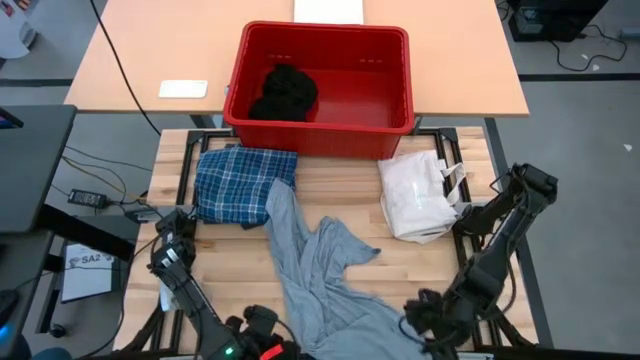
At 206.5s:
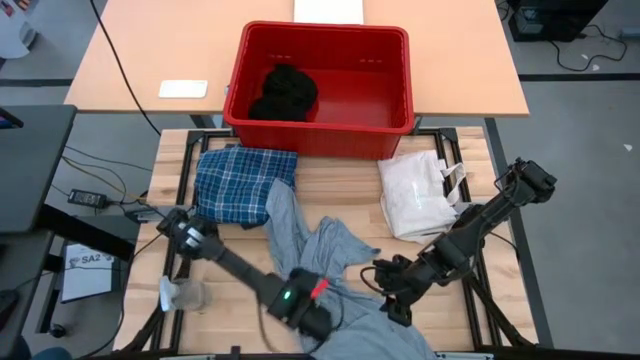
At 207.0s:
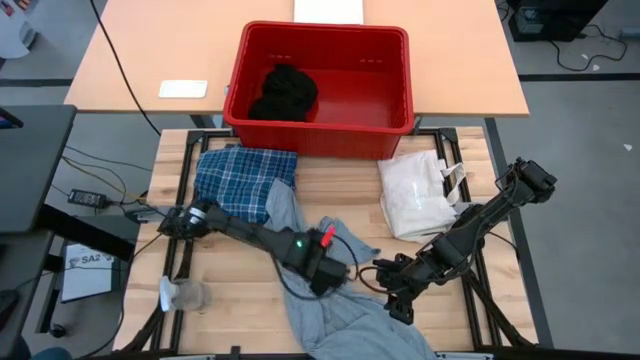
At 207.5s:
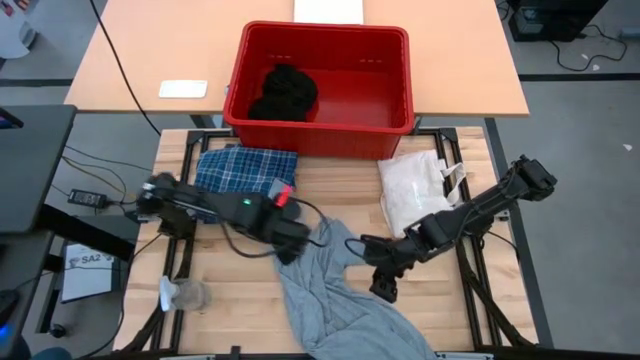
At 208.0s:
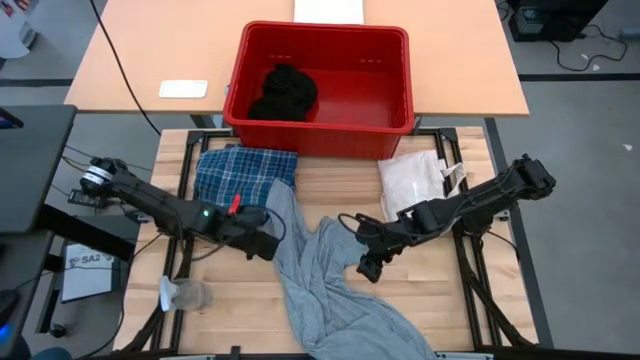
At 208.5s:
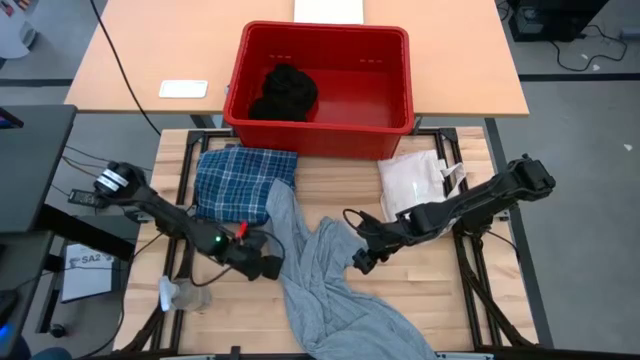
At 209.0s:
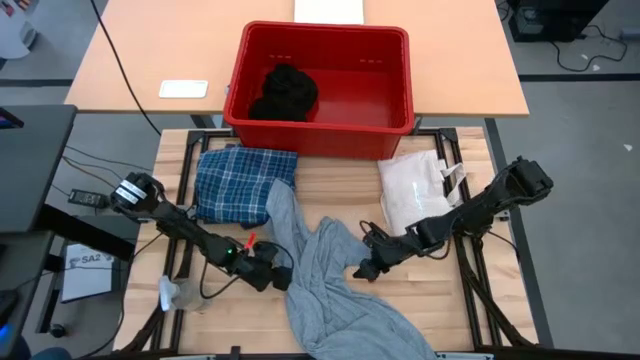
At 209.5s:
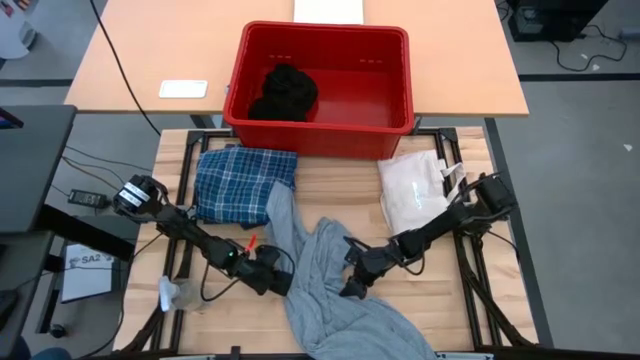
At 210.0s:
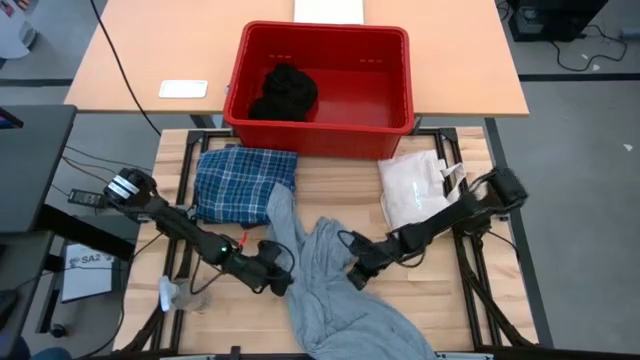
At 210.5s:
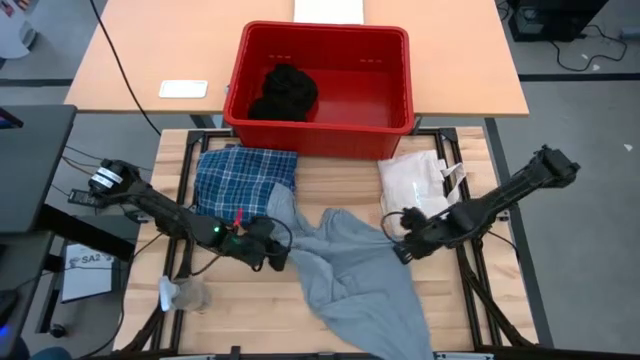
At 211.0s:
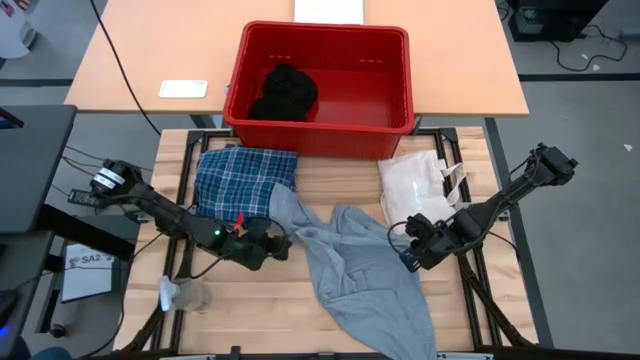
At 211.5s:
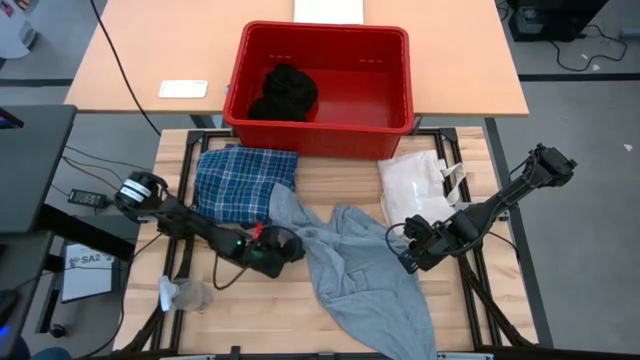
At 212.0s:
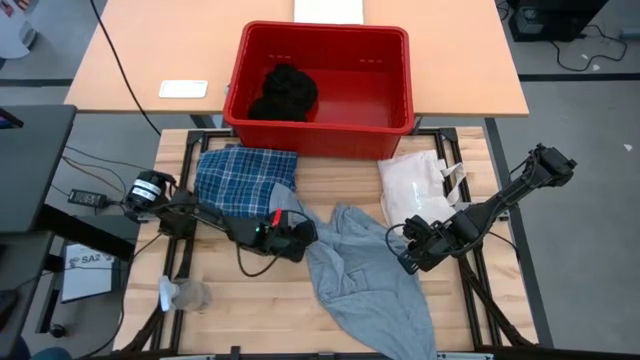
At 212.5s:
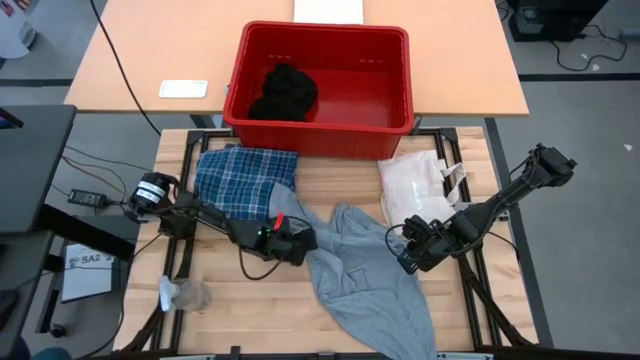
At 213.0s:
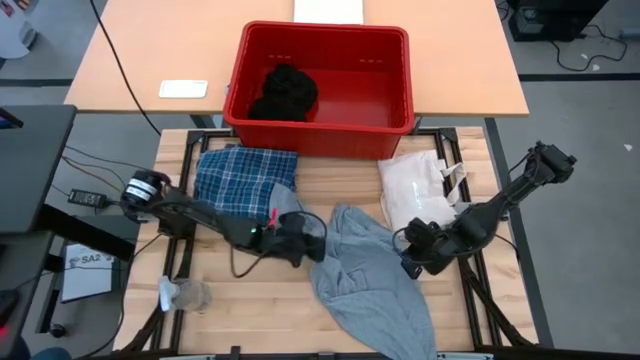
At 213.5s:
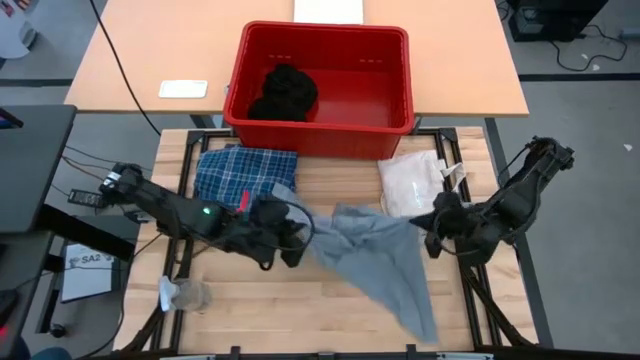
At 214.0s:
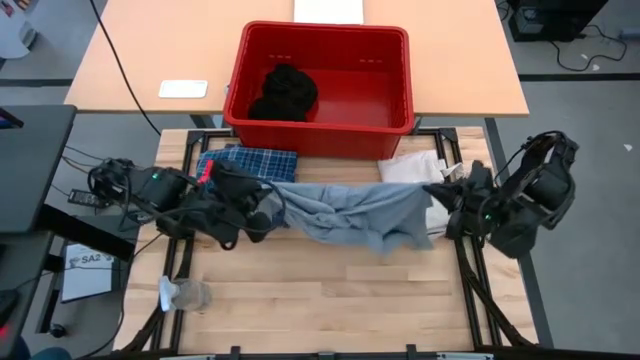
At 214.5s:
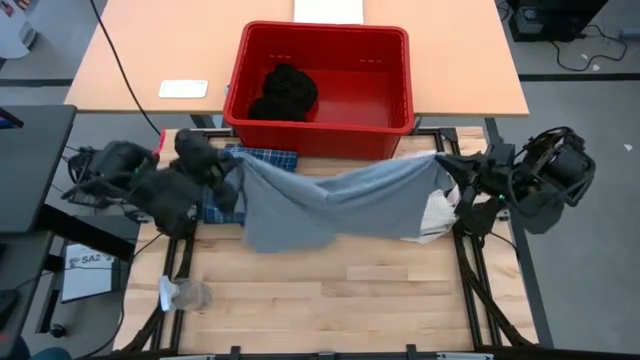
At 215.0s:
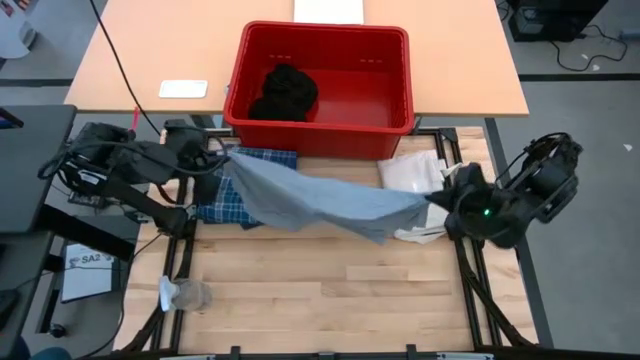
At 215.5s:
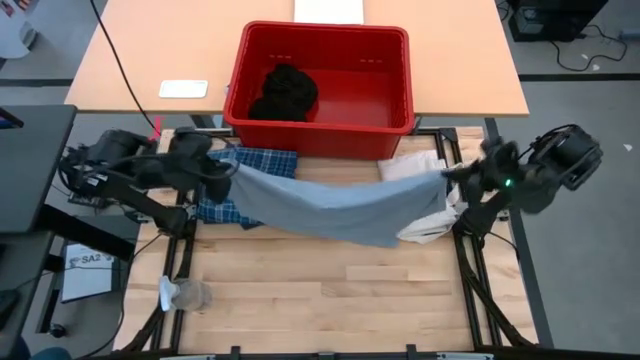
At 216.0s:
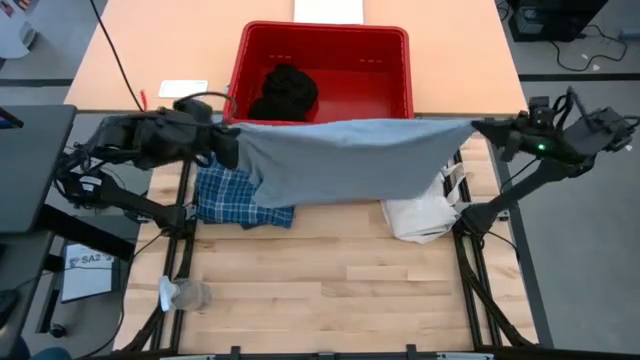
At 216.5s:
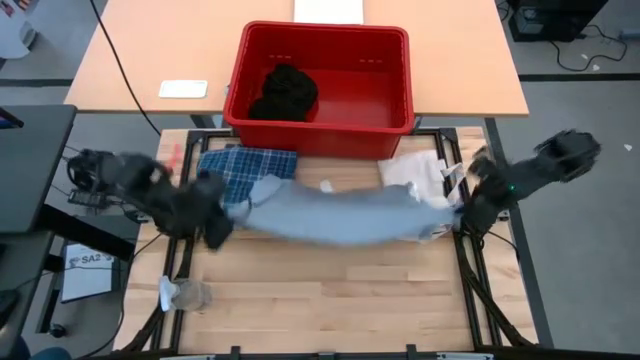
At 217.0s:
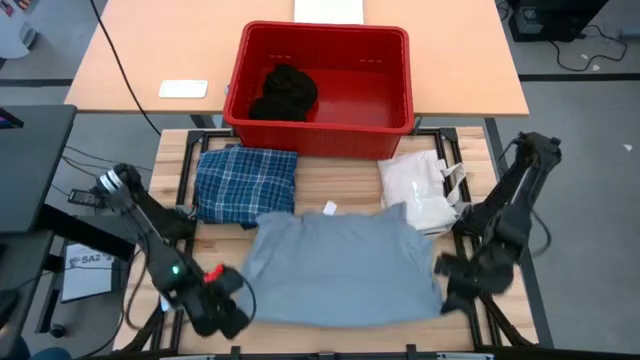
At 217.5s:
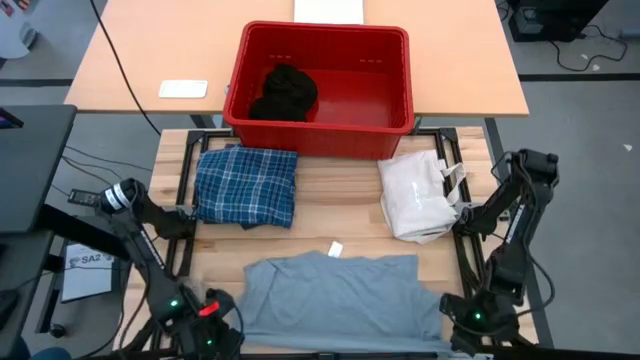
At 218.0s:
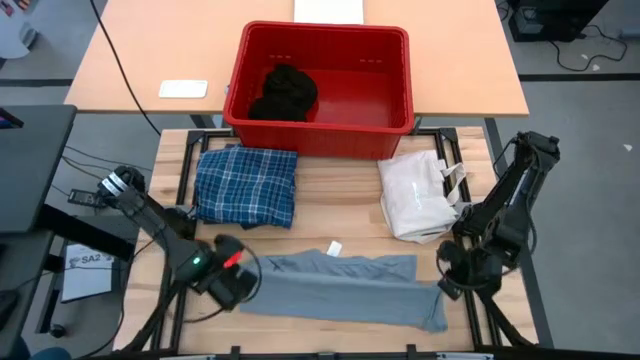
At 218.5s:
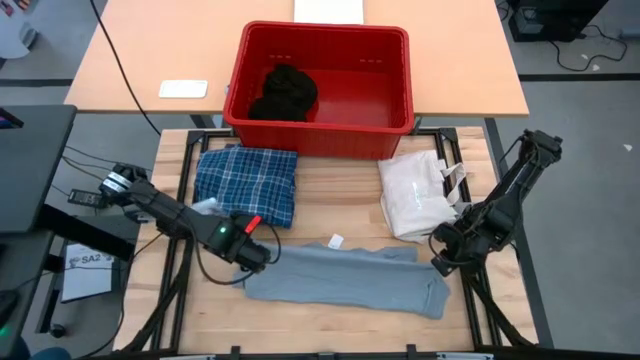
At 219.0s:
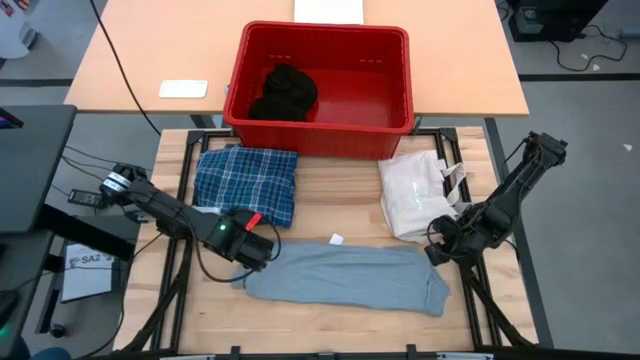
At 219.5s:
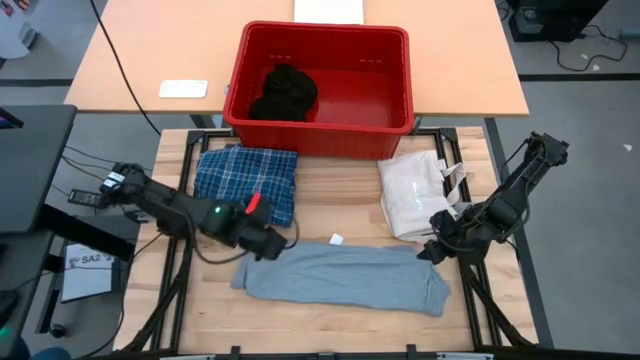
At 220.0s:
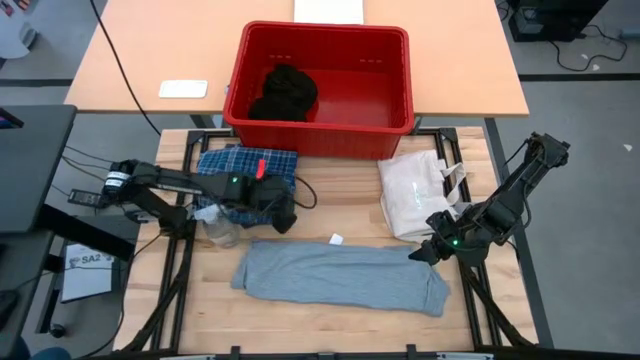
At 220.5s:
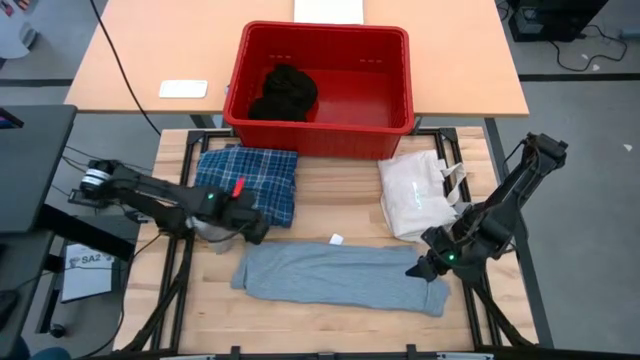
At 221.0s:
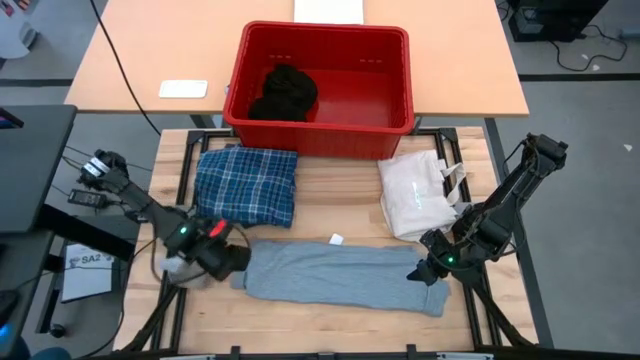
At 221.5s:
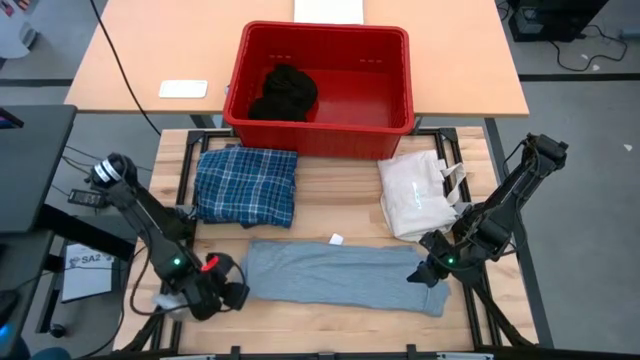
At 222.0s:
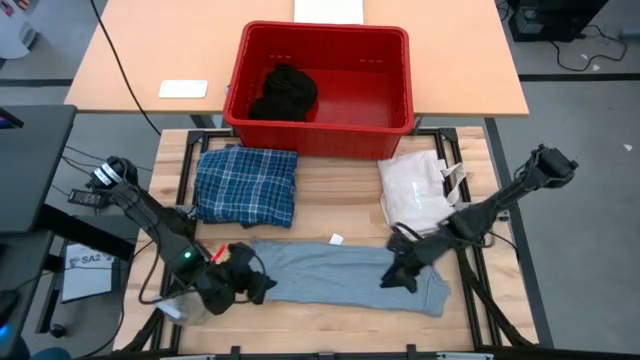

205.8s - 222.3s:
Task: Fold Laundry from Bin
Fold the gray shirt

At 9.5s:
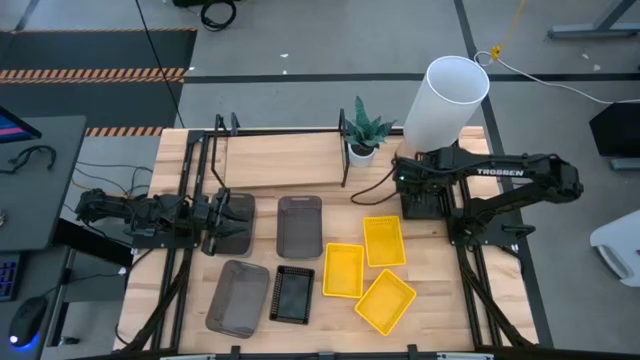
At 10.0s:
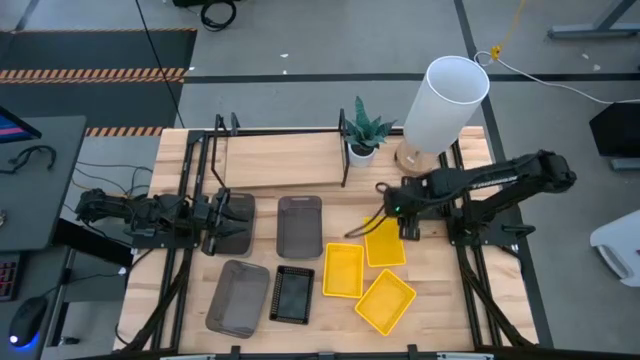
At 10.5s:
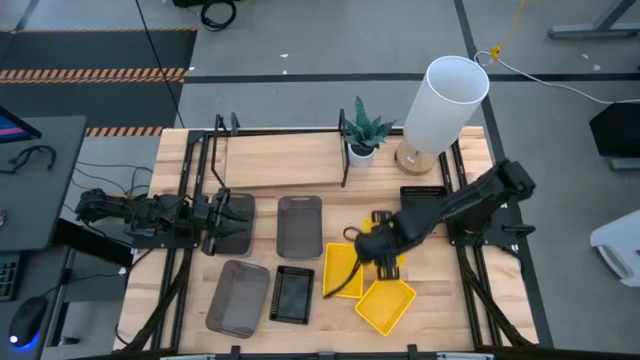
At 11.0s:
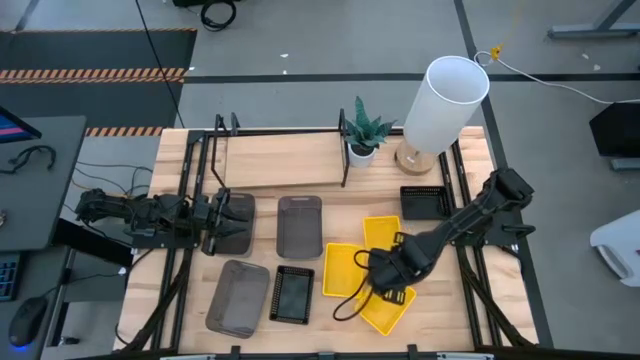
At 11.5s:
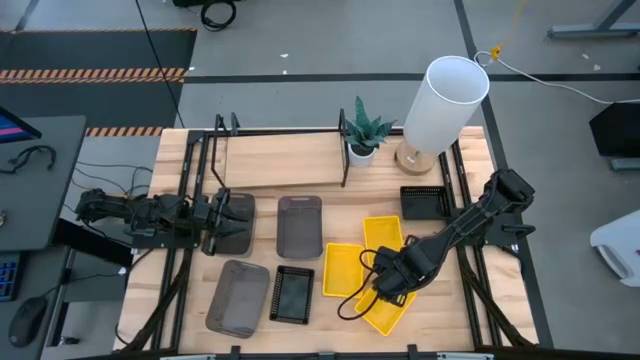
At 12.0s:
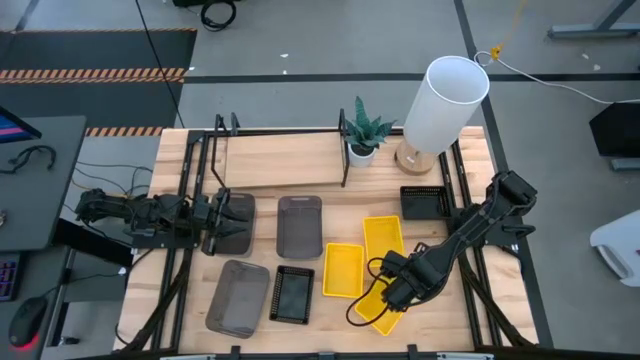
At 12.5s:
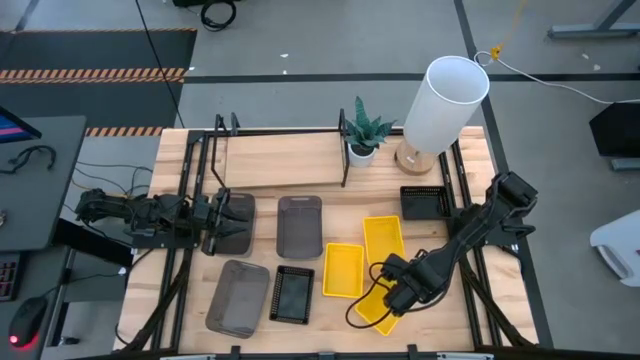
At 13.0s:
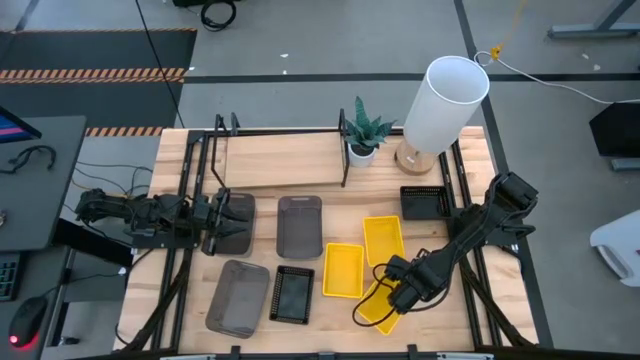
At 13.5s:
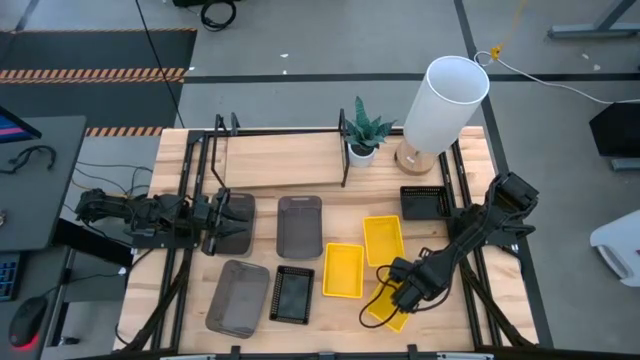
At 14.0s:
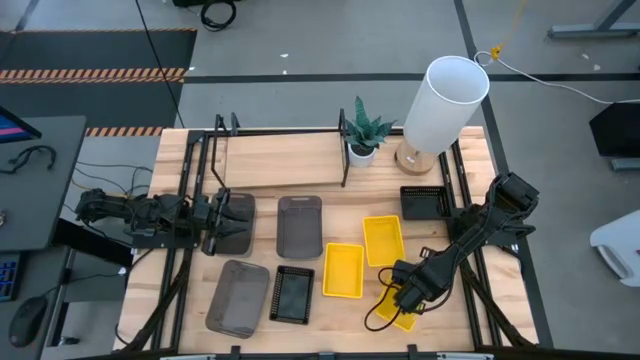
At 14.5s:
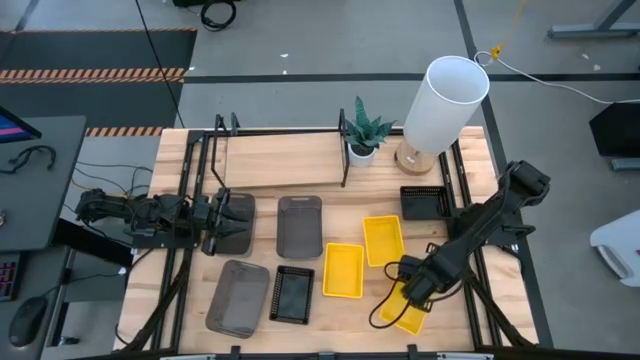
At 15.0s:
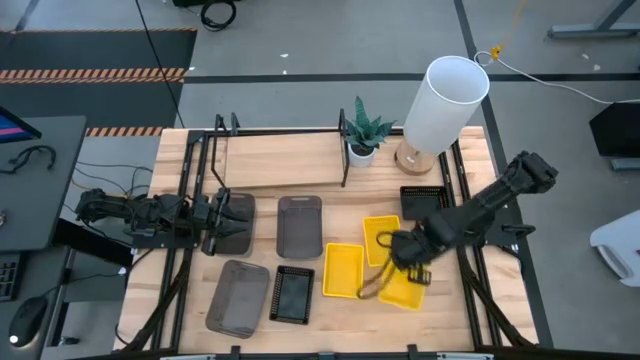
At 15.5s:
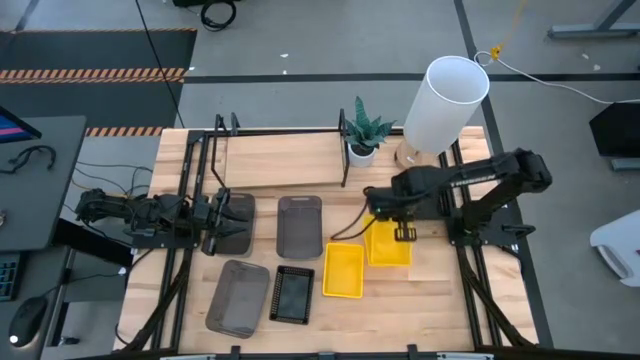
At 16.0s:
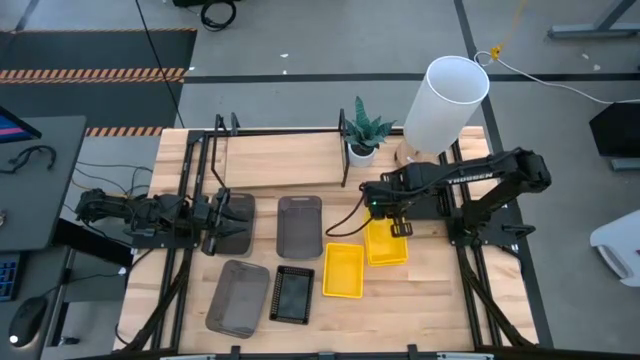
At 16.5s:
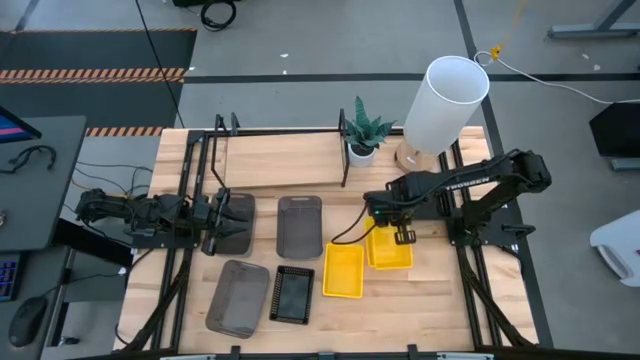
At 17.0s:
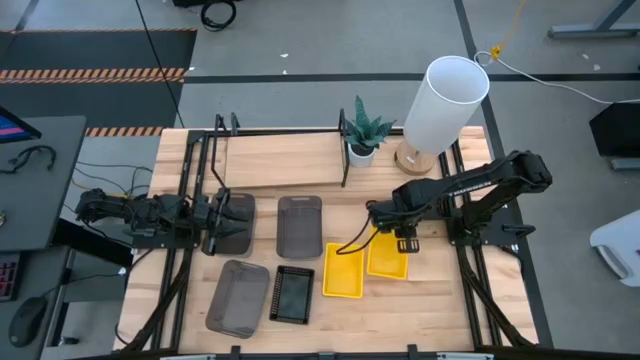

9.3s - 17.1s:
Task: Stack baskets on shelf by color
Stack the bottom right yellow bin on the top of the top yellow bin
